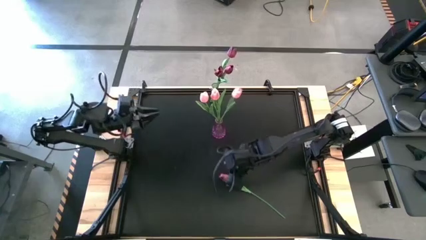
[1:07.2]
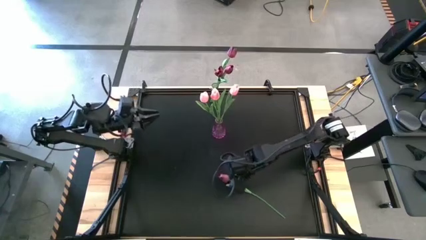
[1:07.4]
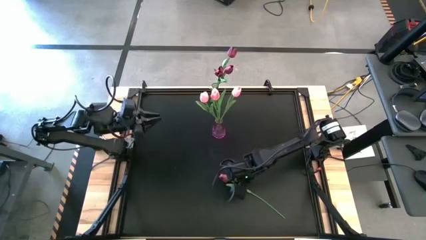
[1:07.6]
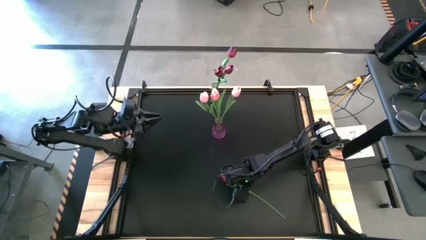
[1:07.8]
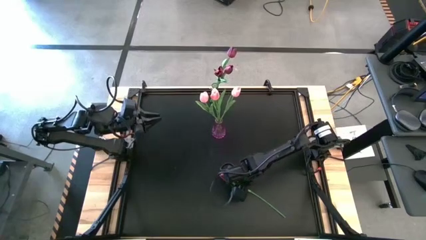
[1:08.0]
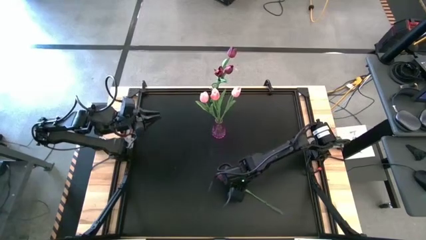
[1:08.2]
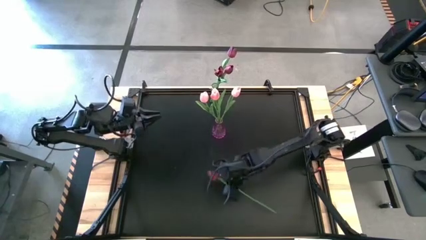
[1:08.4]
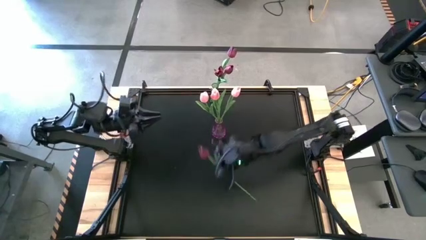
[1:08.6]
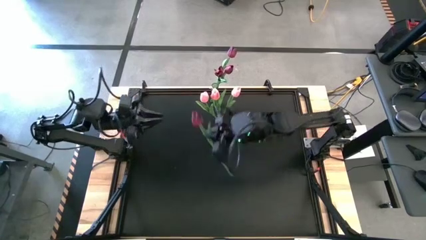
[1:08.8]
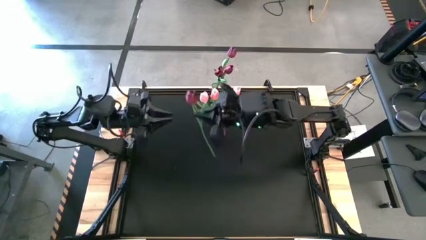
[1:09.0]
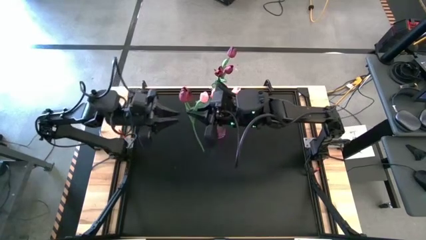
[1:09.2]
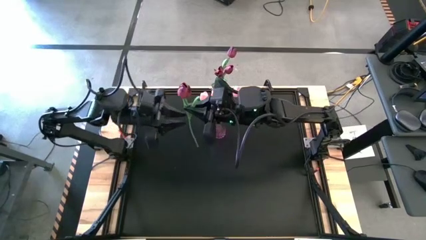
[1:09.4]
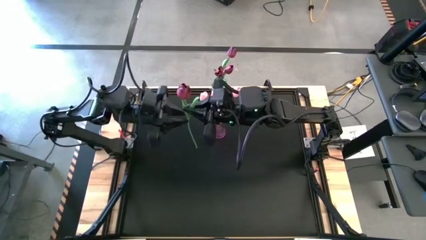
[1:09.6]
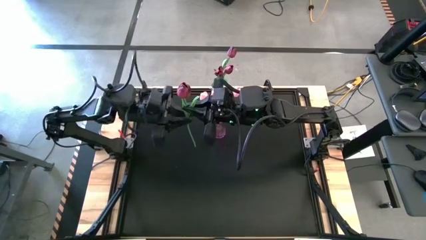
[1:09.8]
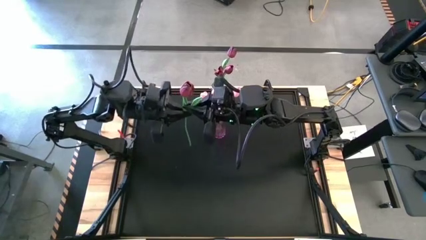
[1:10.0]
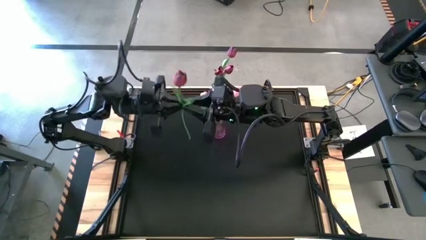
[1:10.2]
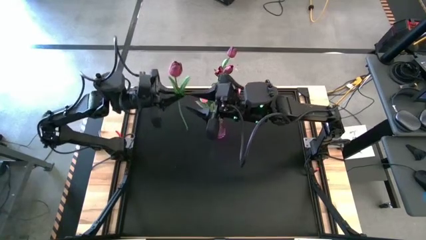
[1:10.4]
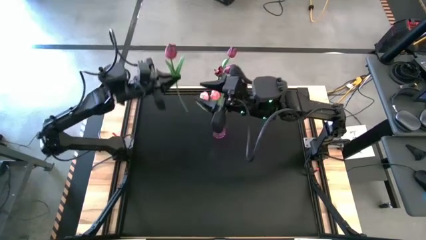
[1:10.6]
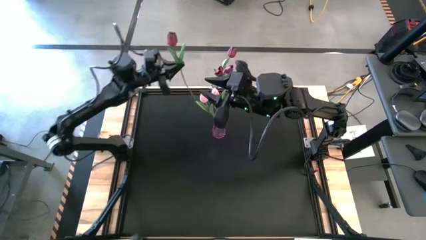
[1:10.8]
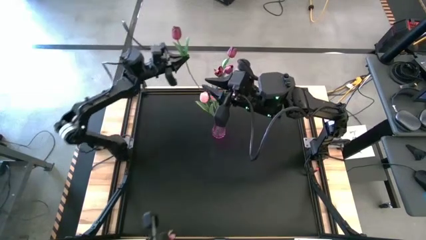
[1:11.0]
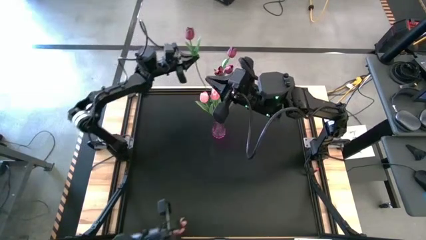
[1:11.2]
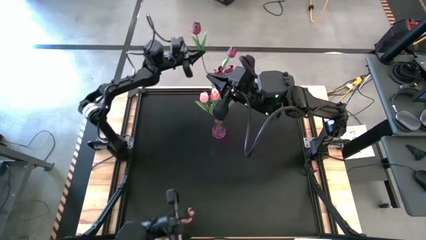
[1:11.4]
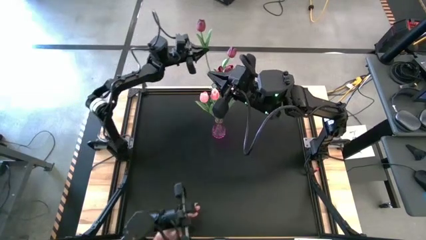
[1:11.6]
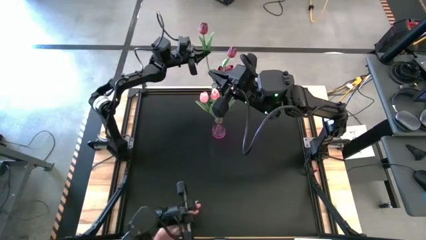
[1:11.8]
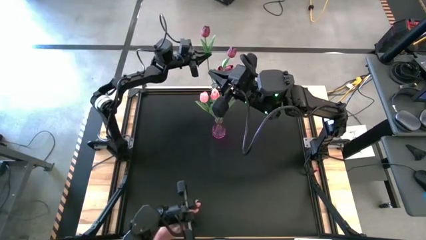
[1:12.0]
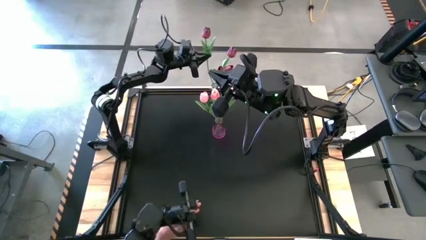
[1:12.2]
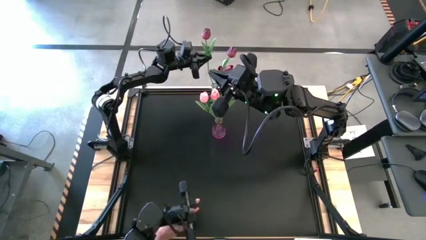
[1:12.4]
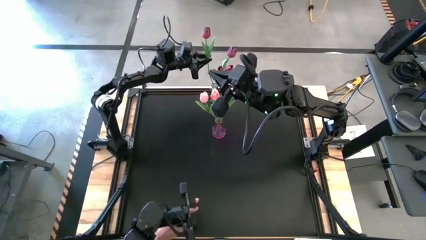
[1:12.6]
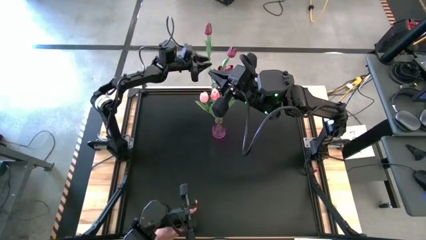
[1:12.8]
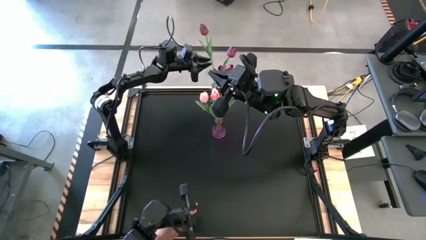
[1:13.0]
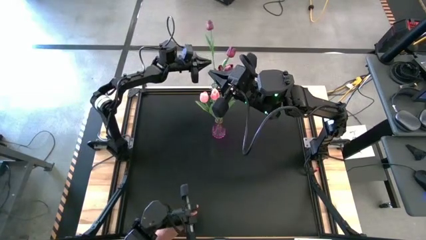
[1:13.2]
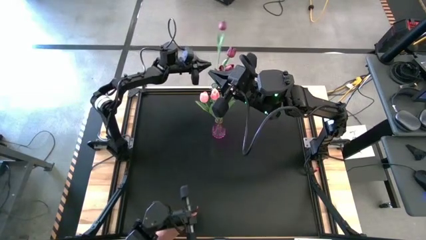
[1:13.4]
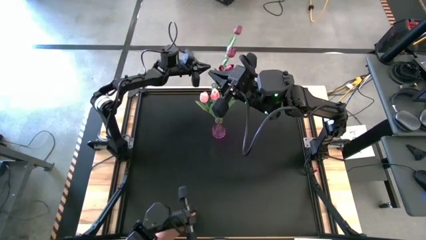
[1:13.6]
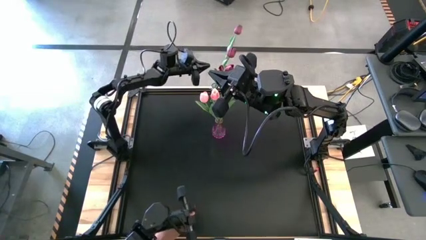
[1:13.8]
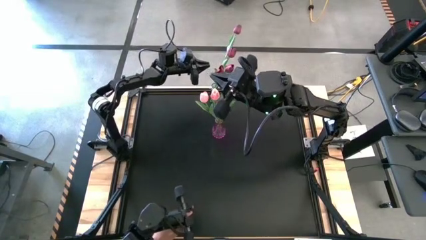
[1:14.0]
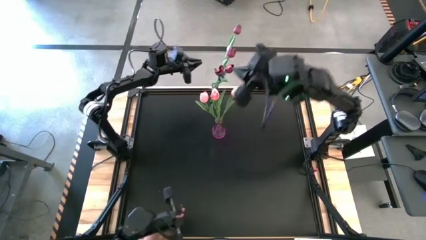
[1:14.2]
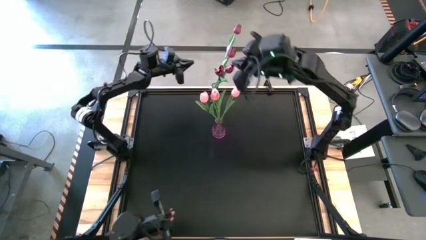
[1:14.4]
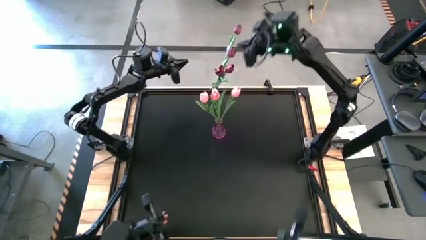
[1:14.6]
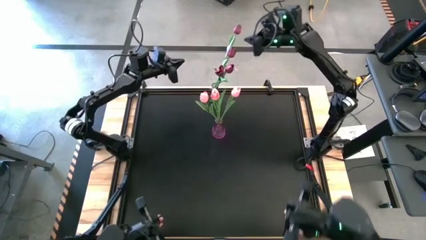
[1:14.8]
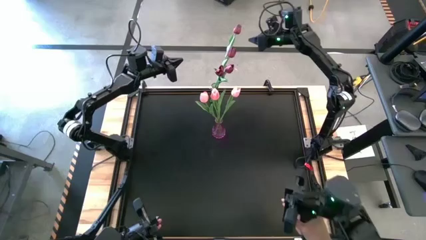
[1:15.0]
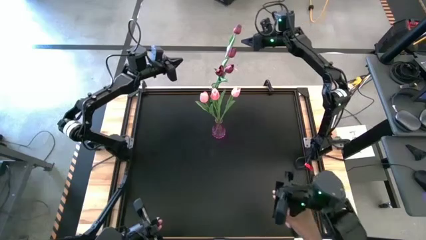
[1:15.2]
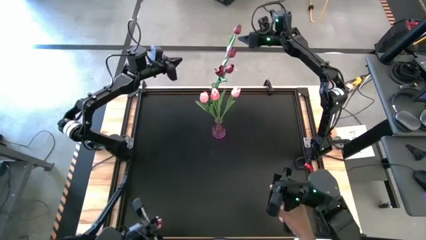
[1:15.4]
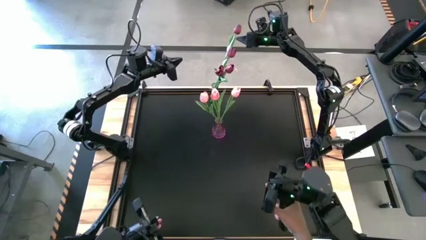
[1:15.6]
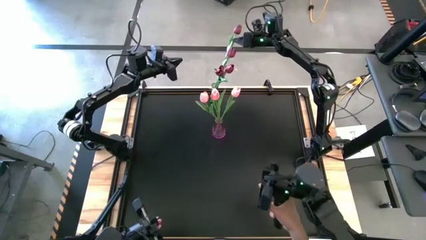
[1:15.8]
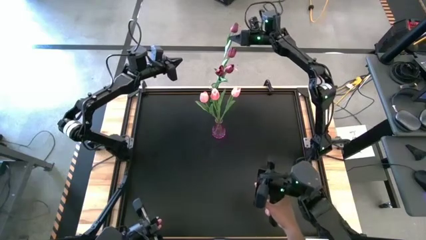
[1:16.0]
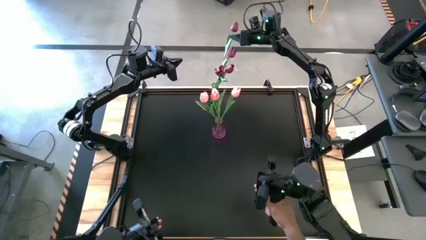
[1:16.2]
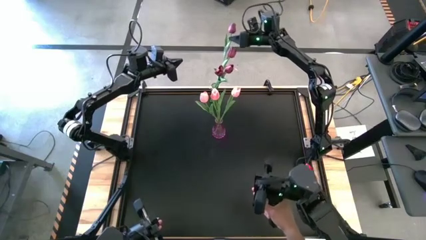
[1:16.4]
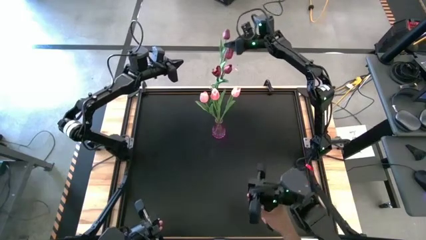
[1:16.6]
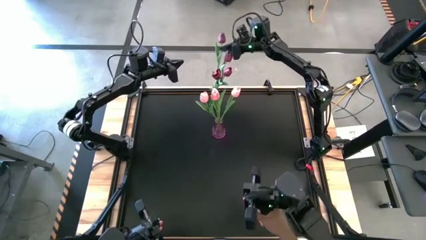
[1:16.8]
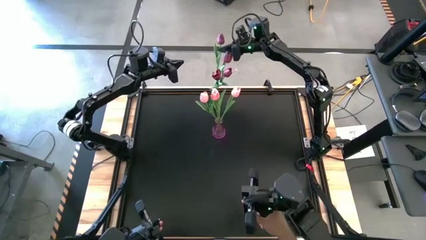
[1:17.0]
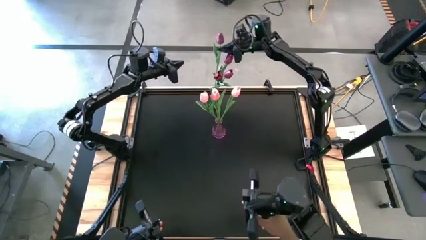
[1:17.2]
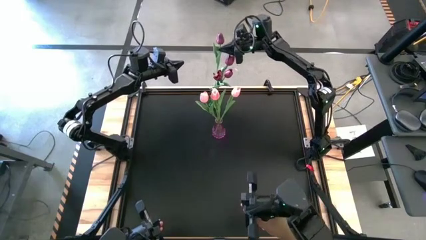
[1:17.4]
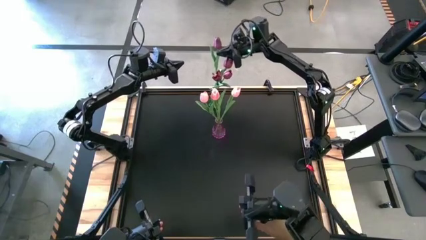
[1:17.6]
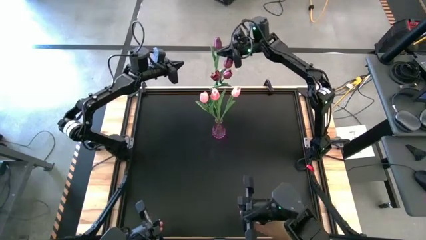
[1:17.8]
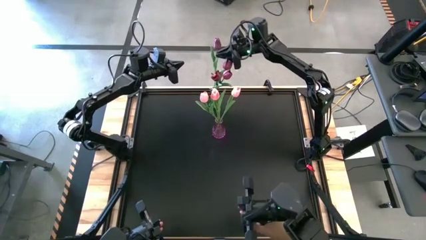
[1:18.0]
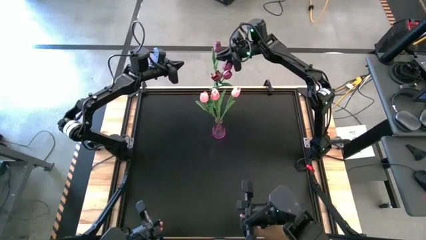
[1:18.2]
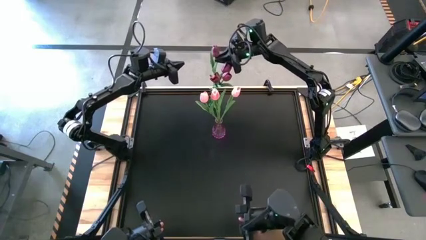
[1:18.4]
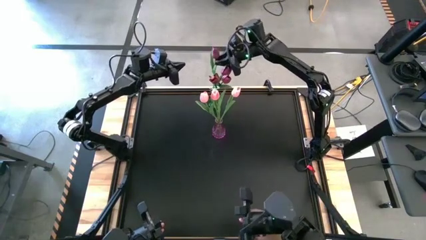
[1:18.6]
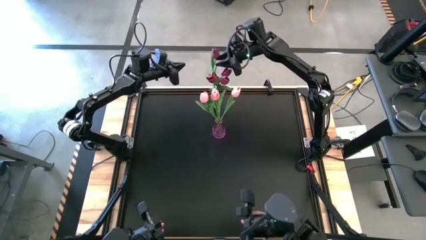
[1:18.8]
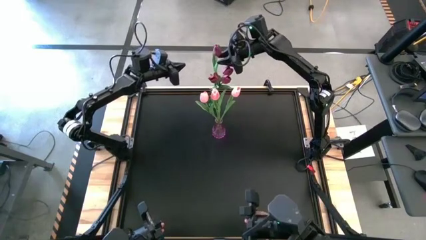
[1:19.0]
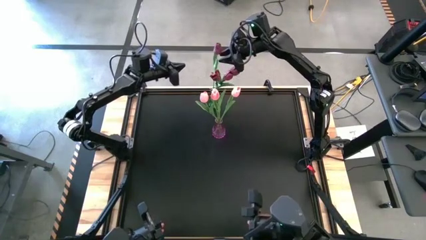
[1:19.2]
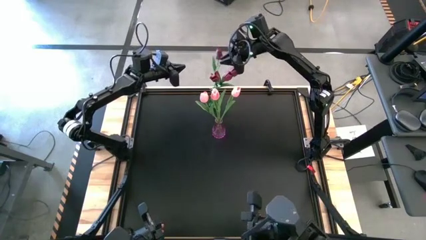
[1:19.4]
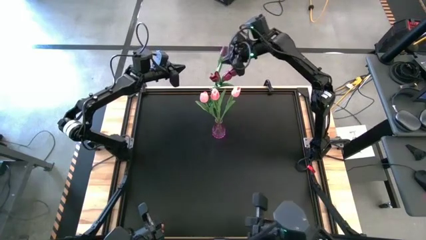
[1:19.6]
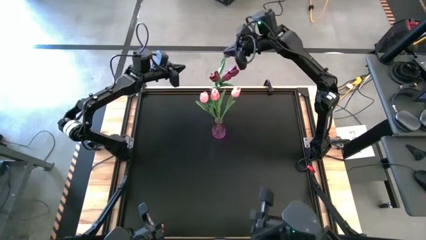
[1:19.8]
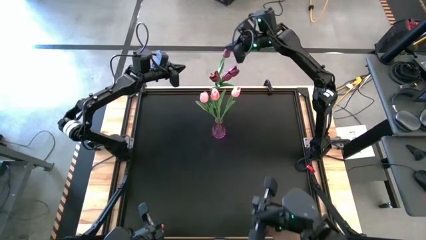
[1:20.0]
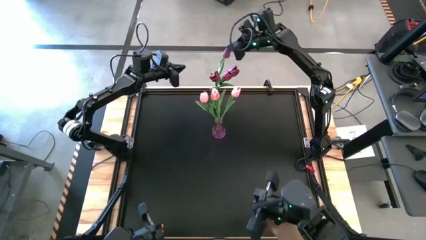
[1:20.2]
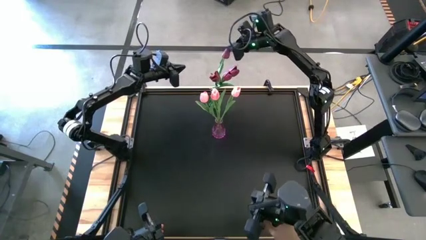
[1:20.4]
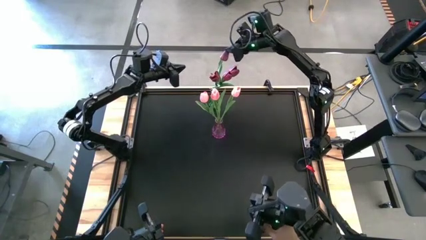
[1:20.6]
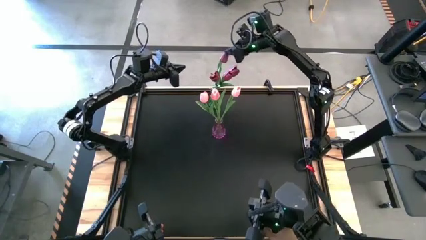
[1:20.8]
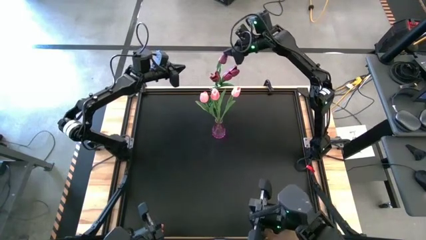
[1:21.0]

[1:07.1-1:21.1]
Task: Sort flowers into vase by color
Put the red tulip into the green vase

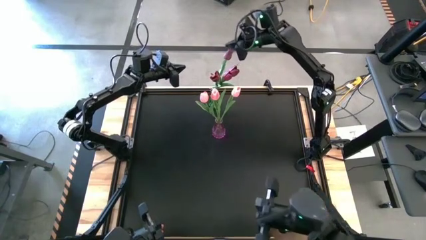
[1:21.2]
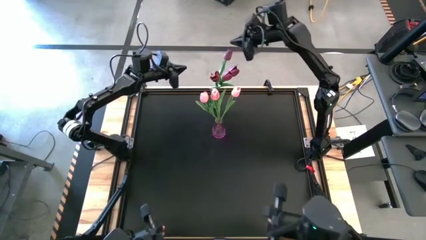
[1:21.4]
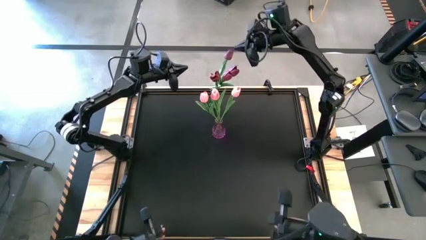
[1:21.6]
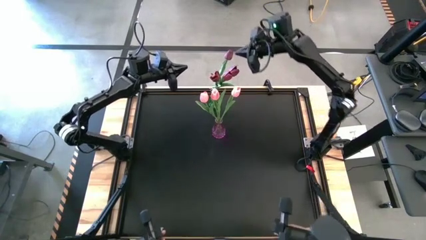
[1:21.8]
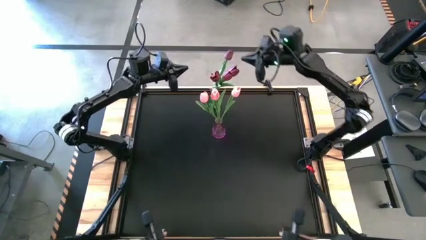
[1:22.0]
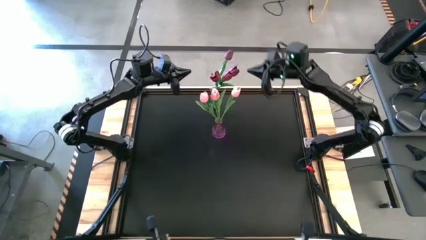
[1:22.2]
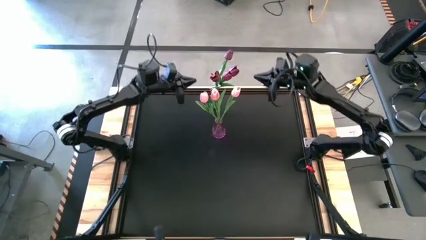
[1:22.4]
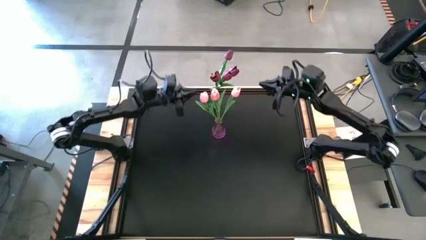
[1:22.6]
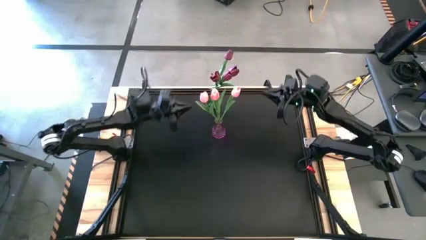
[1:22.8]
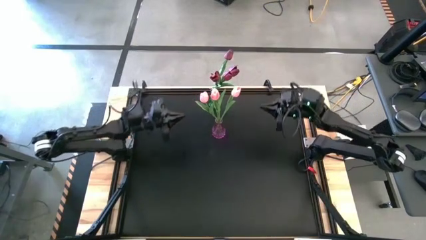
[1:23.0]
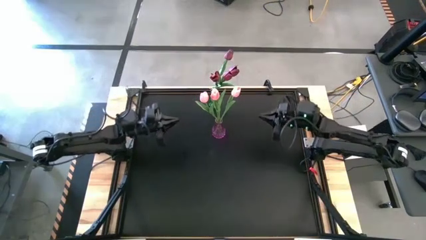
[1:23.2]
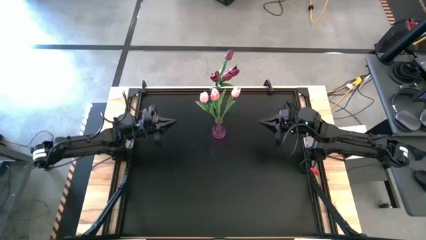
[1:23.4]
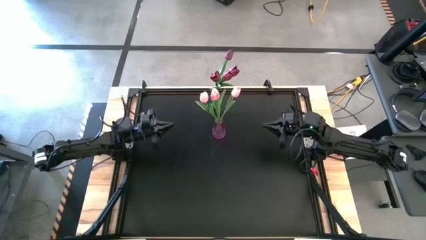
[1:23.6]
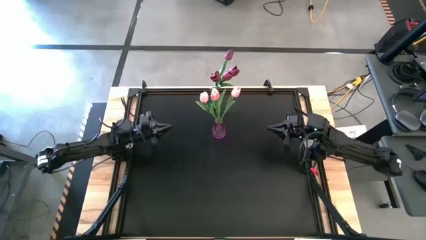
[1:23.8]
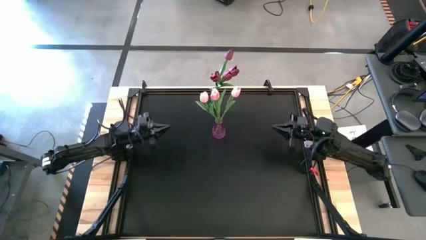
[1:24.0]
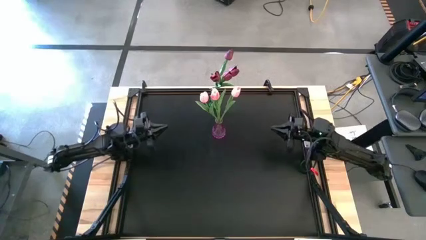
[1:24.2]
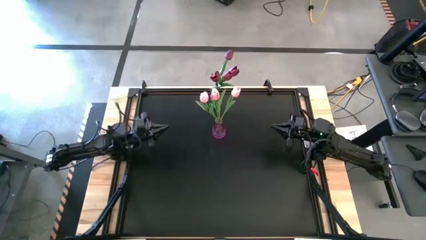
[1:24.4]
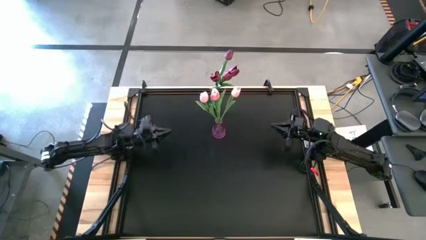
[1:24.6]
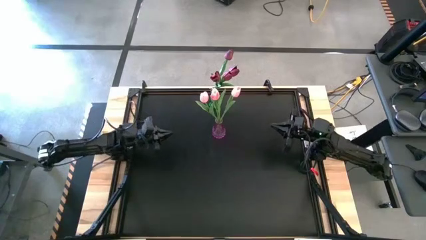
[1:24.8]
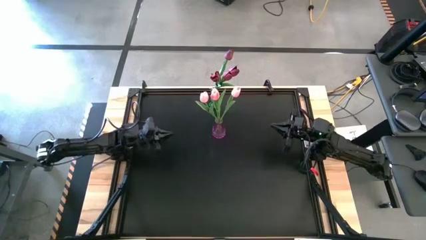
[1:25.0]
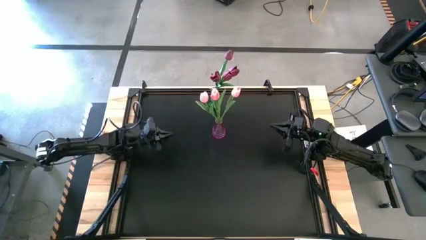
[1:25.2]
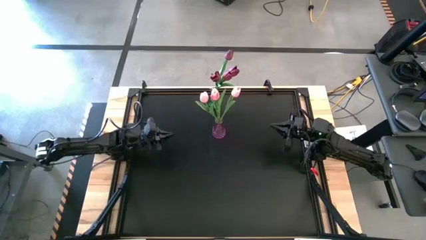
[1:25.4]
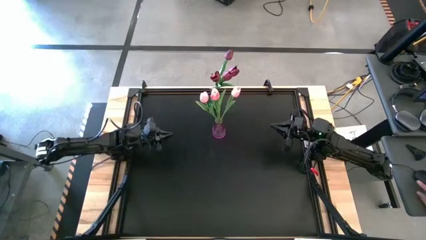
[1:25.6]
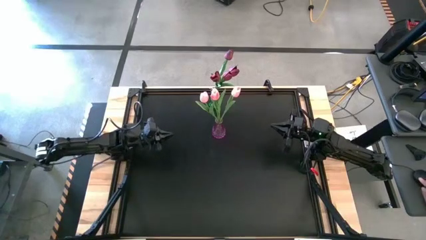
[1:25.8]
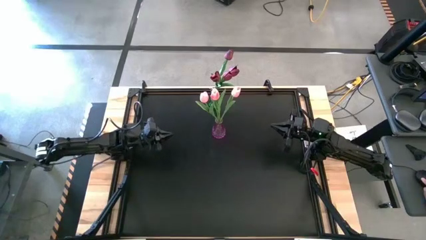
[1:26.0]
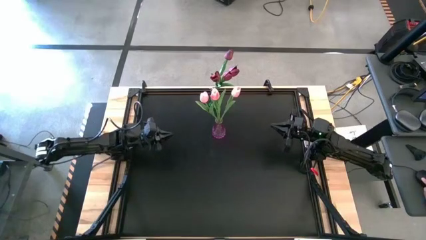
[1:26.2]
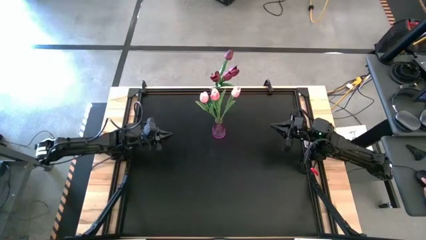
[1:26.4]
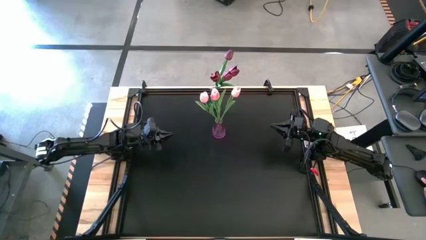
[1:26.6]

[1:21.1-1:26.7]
Return to Home Position
